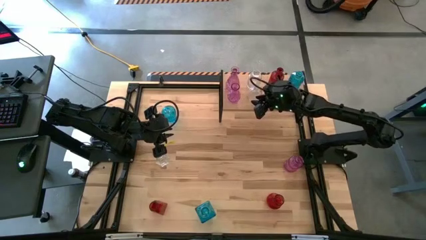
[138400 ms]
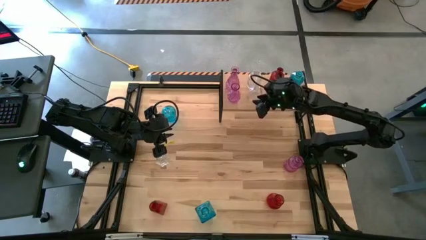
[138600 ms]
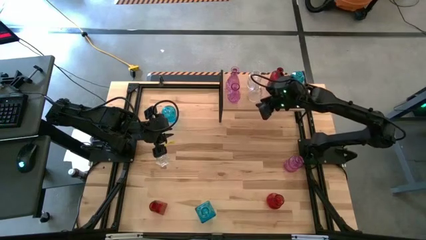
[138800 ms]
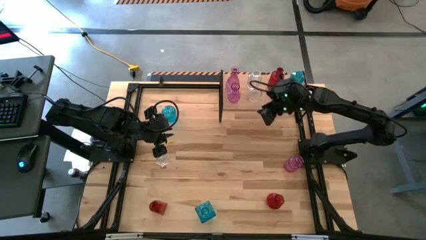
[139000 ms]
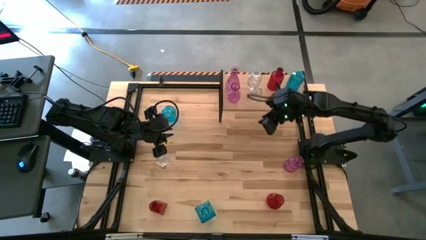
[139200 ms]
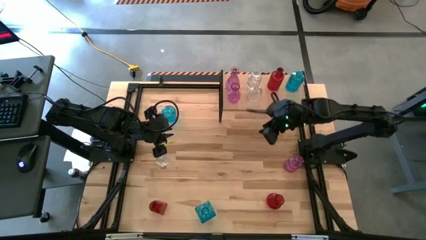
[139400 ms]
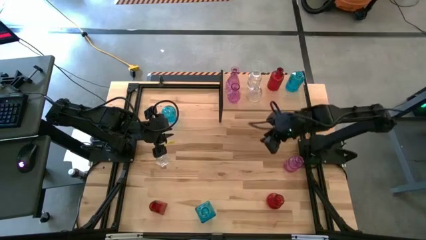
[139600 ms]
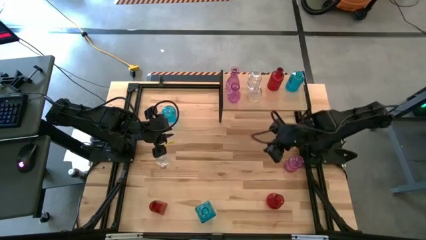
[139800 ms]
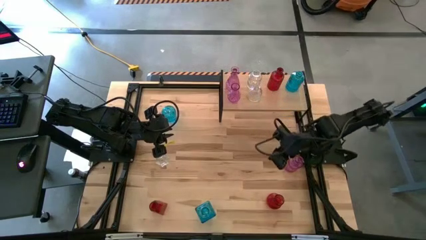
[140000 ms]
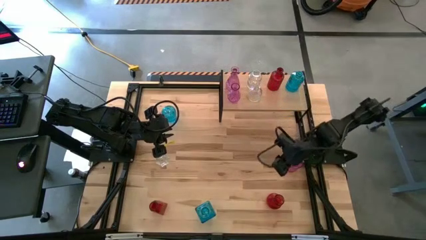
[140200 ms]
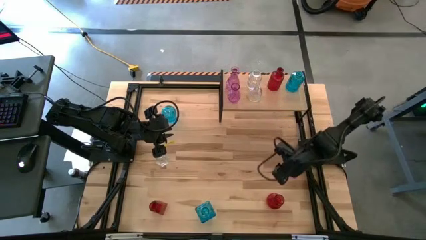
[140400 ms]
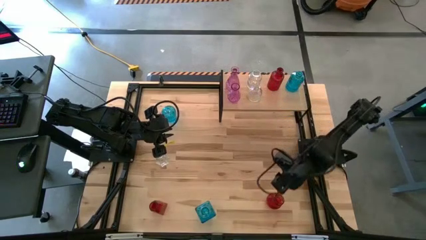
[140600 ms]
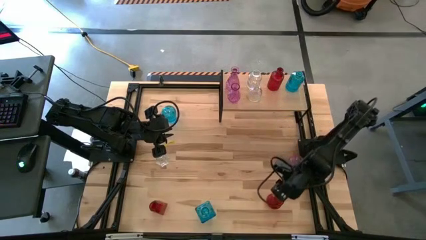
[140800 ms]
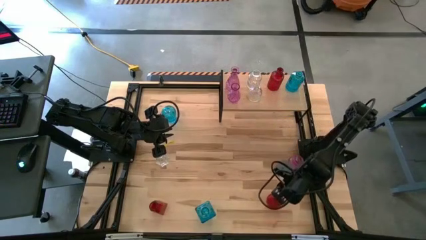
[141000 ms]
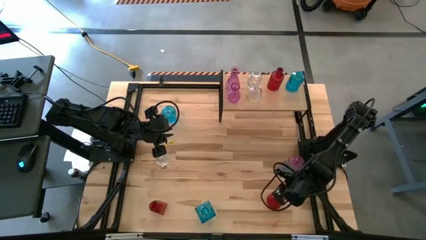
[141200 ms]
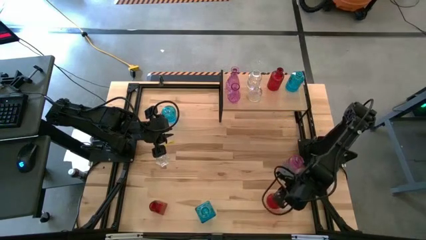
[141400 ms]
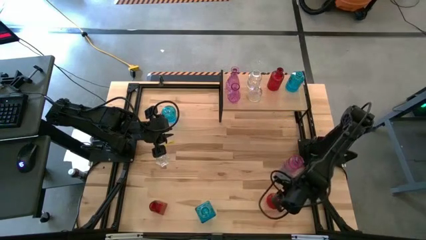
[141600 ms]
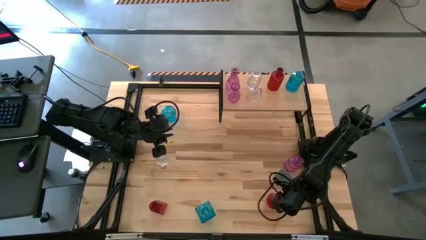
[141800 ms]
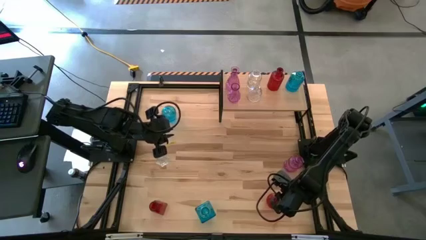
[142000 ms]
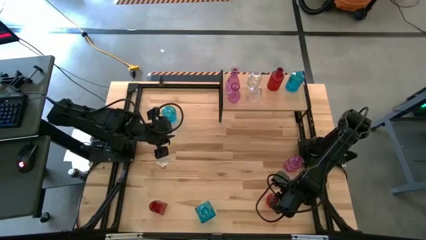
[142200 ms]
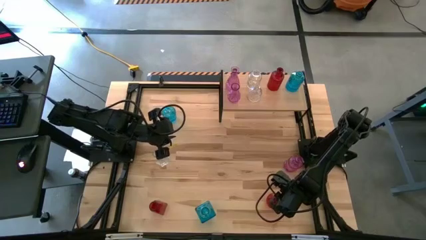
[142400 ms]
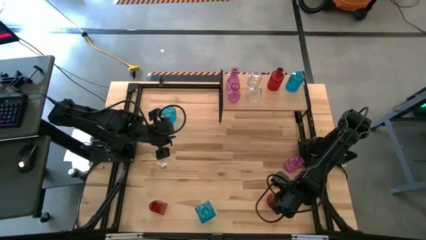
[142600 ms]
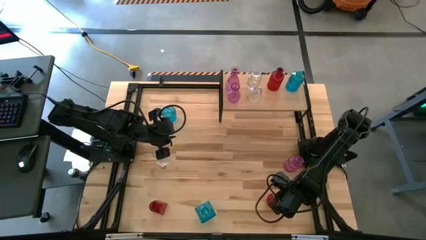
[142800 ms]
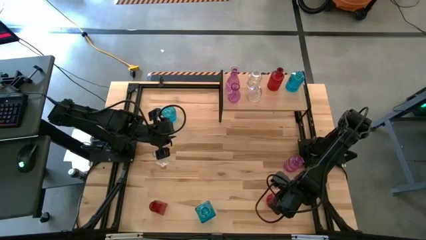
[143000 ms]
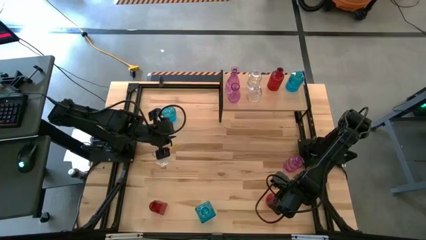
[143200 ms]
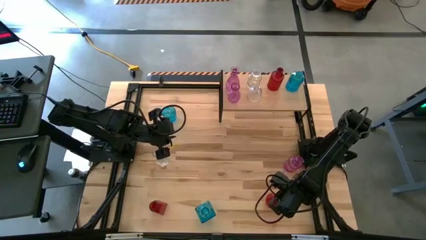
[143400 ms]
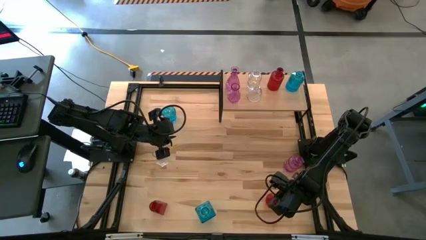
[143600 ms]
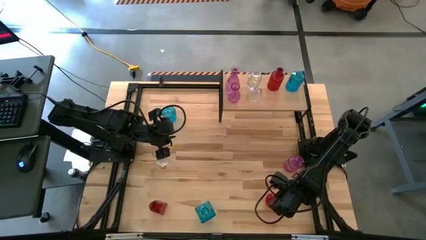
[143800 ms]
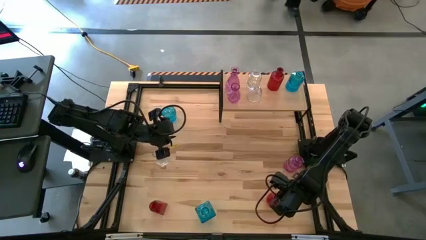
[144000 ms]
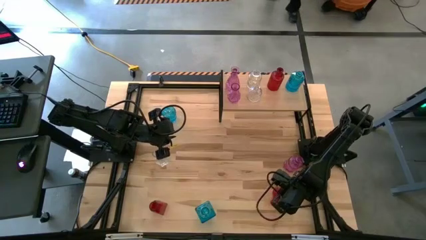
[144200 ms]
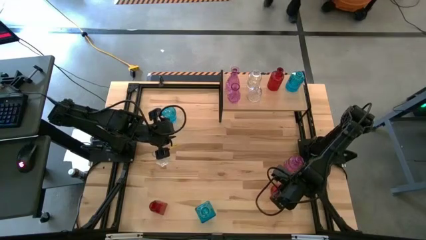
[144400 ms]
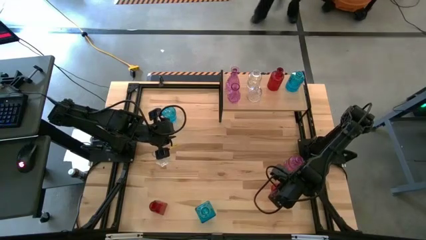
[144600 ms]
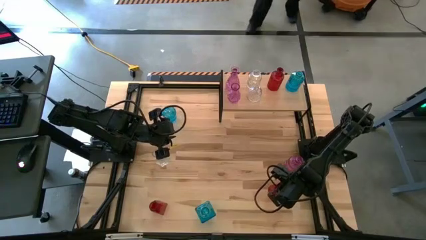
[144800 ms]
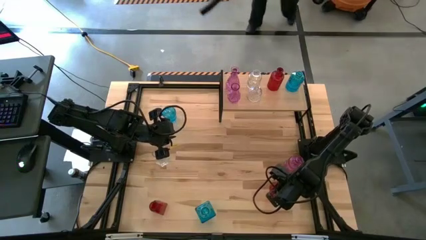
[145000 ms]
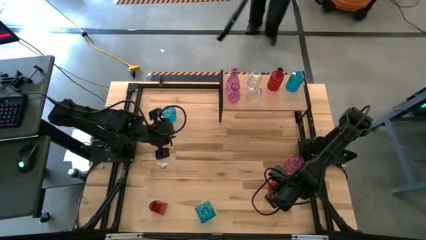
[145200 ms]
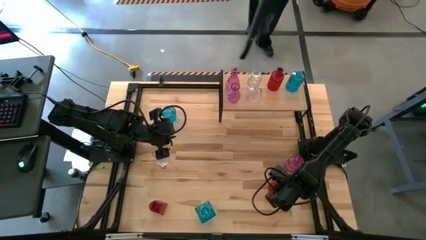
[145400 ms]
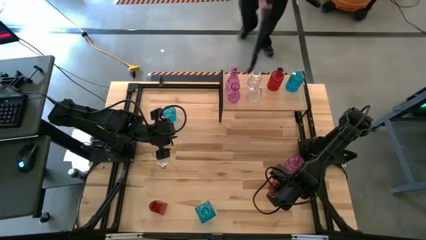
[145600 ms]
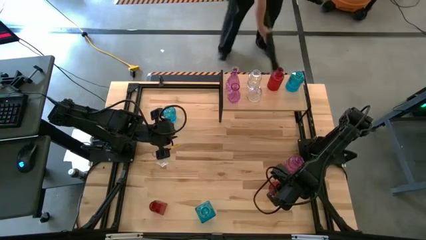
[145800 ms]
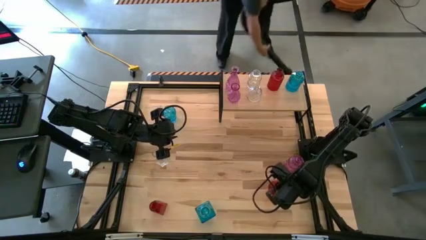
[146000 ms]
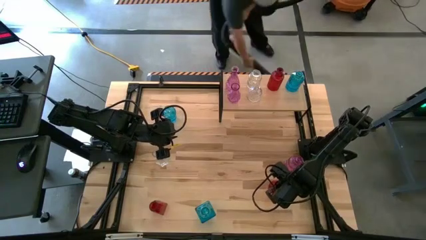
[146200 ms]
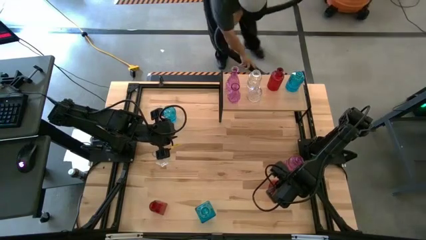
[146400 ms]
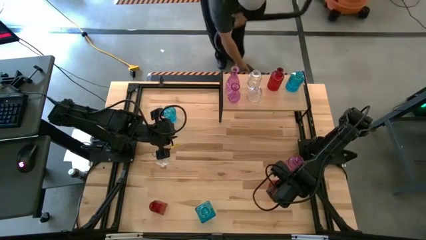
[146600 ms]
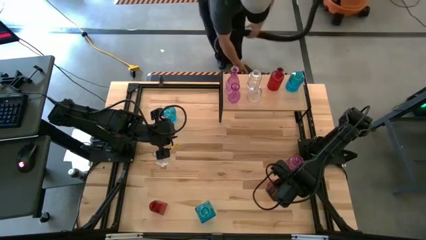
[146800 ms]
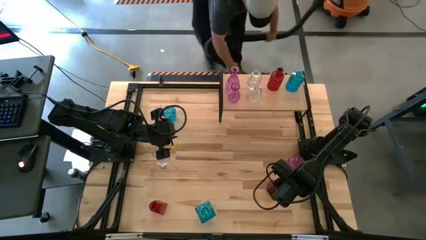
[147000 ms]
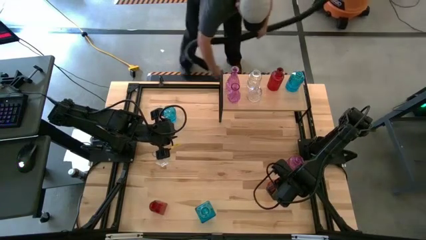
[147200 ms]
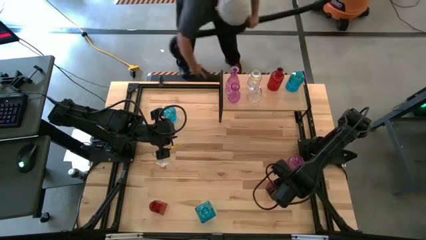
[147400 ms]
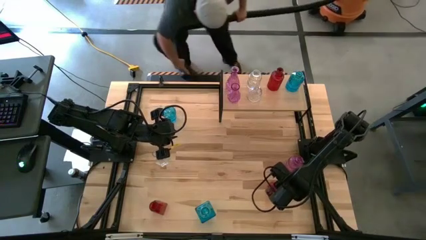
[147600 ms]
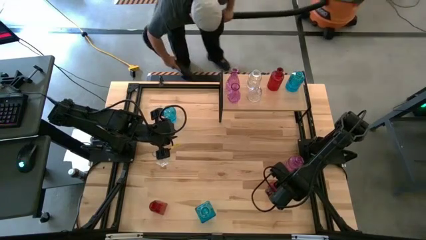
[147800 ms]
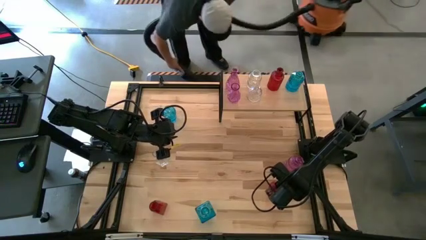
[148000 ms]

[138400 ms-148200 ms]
Task: sort vases onto shelf
Put the right red vase on the shelf aligned with the other red vase

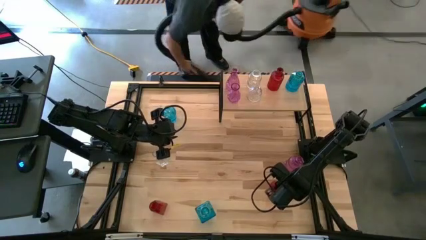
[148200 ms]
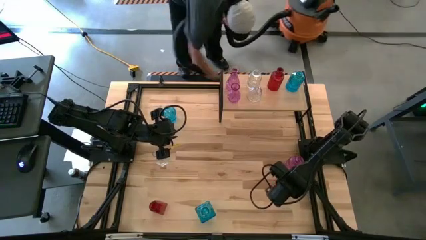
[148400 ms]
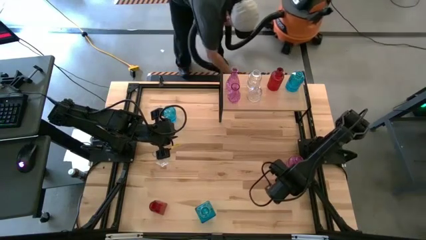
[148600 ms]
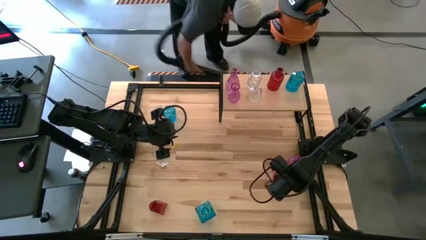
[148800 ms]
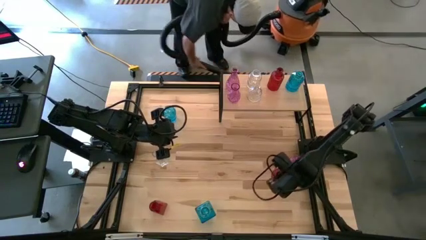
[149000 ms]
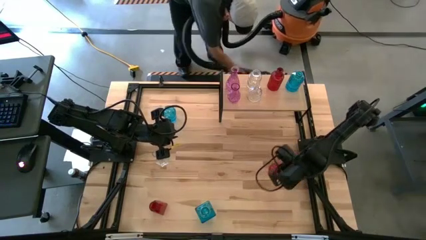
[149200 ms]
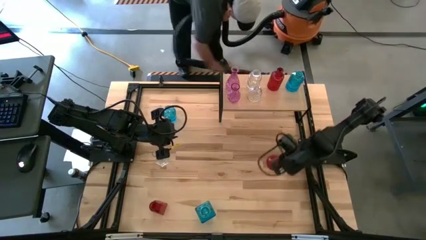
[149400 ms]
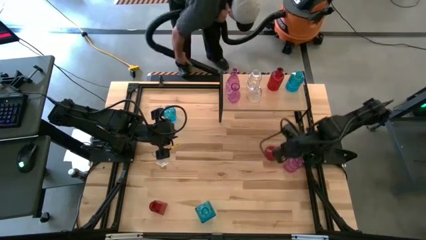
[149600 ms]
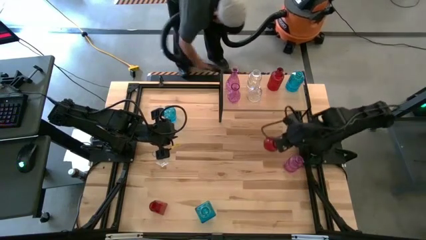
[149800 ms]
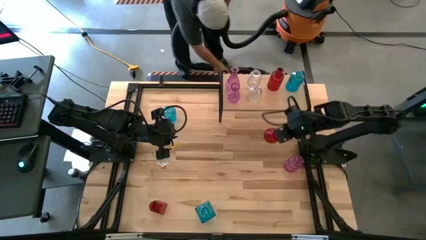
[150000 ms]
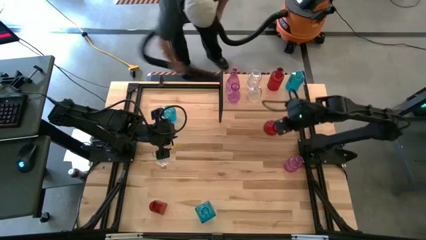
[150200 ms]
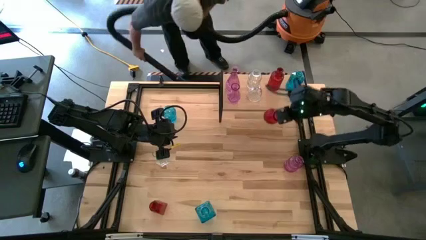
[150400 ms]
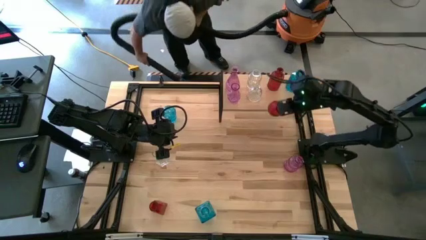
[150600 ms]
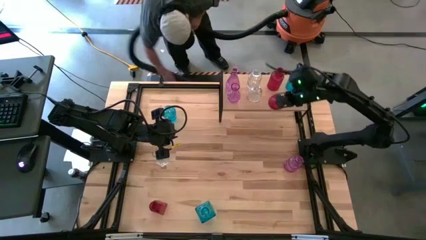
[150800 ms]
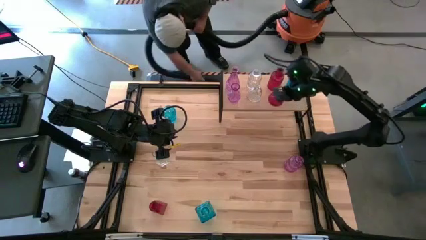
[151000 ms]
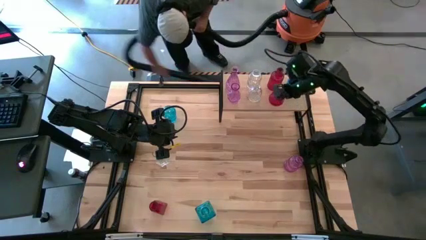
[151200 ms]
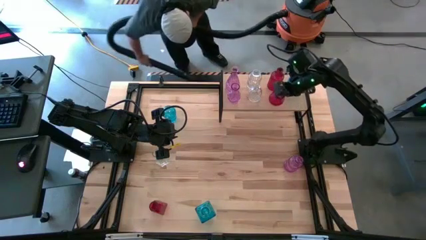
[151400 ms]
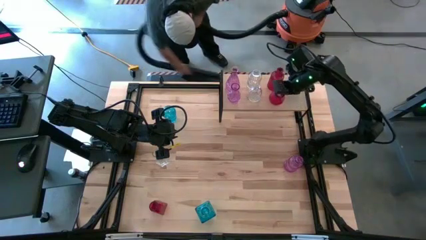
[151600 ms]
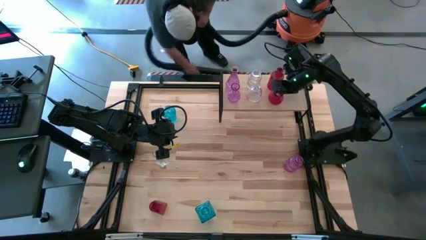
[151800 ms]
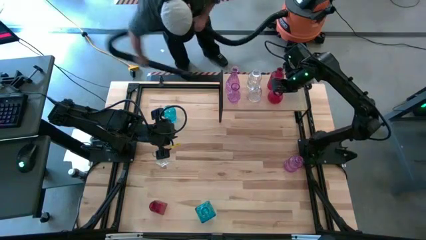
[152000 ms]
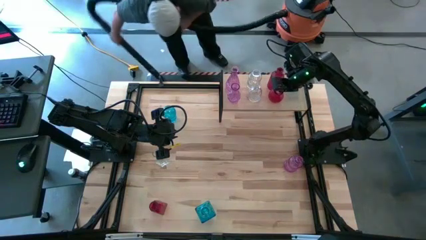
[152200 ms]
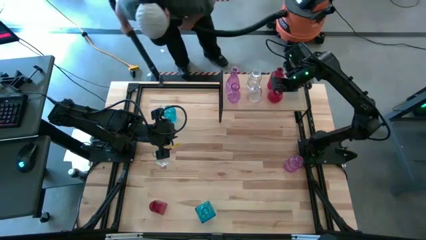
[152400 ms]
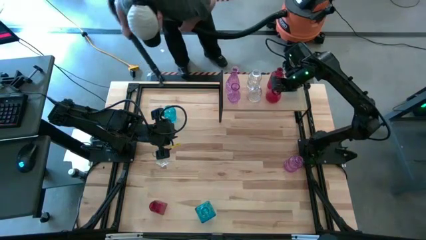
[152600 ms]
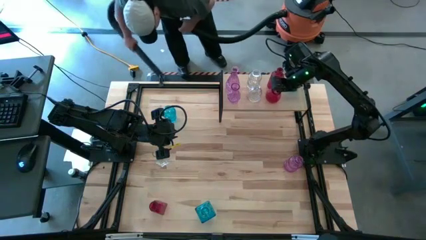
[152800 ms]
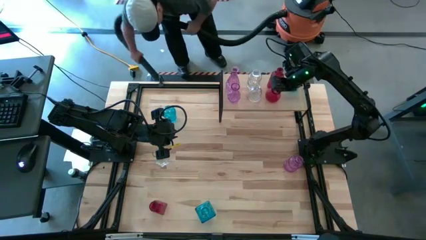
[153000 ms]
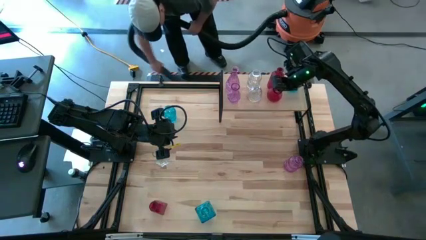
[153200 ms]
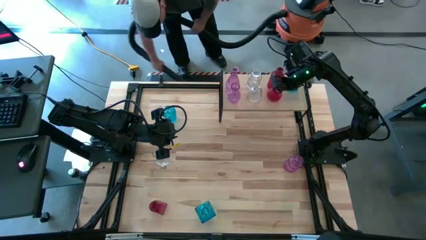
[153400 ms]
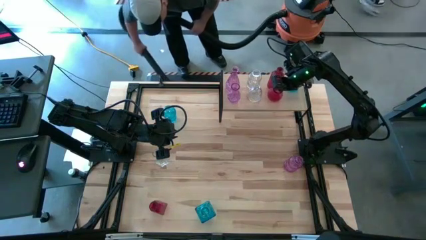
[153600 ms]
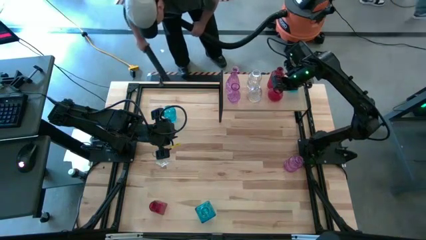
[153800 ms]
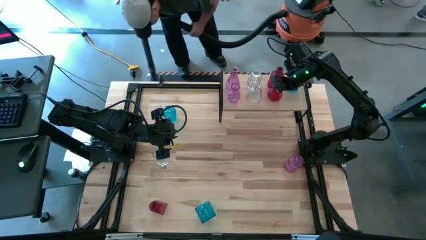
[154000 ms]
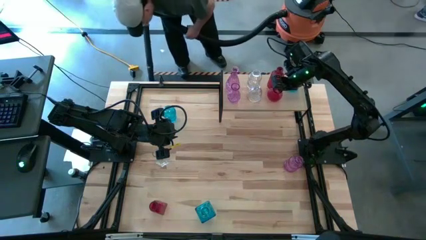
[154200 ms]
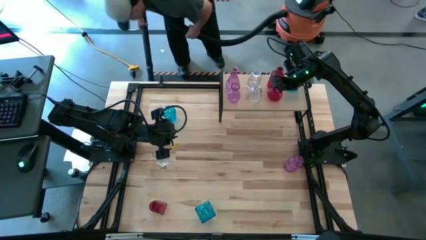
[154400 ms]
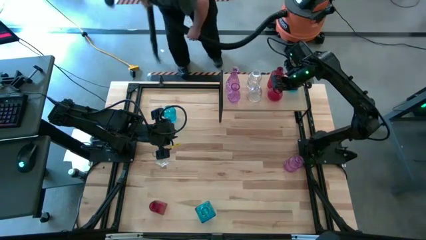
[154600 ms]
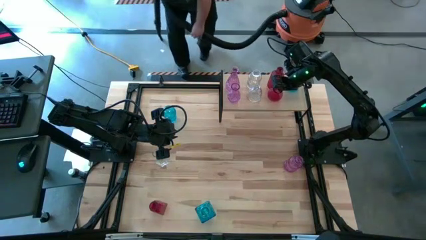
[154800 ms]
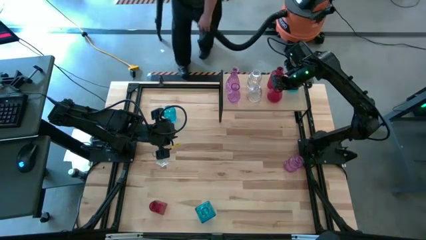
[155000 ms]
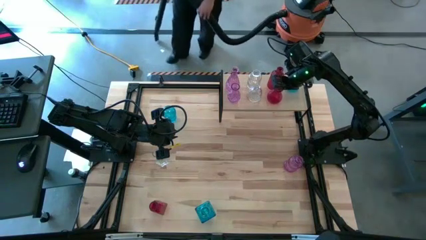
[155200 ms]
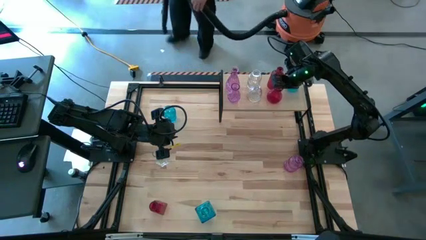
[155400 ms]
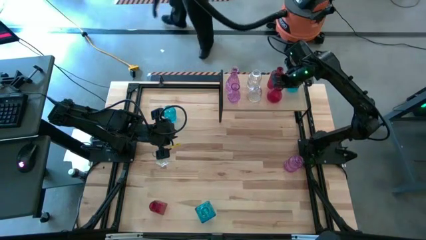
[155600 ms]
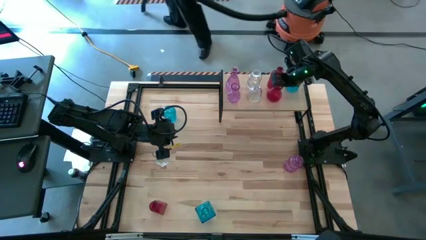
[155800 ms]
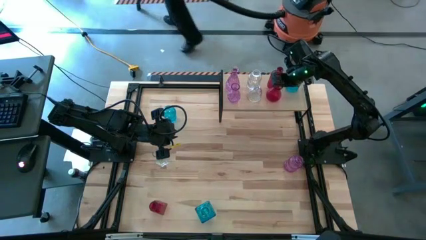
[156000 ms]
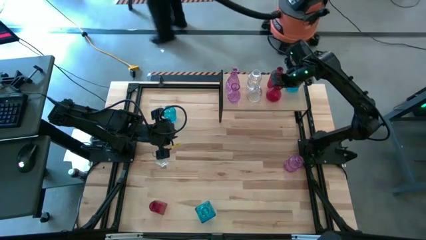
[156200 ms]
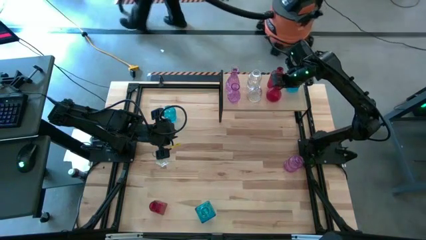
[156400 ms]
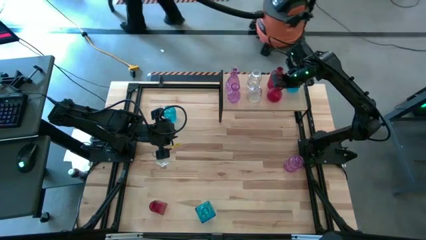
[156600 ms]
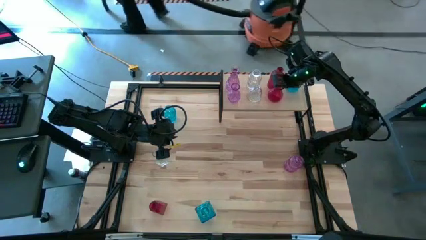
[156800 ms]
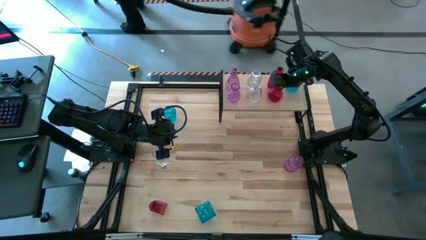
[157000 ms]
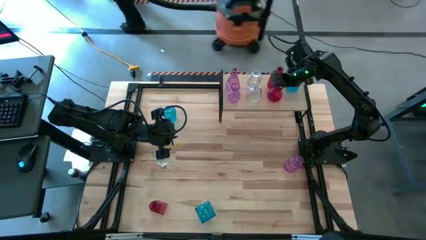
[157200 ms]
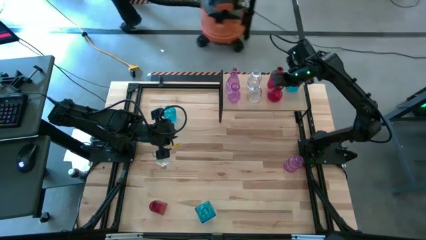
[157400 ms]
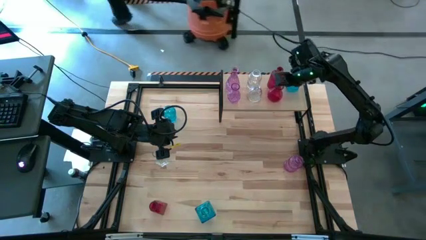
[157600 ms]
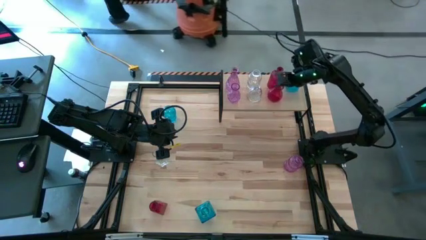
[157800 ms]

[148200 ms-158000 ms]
Put the right red vase on the shelf aligned with the other red vase
